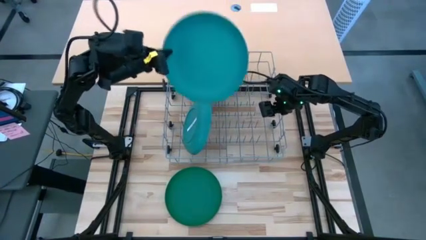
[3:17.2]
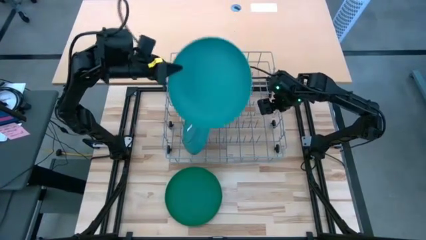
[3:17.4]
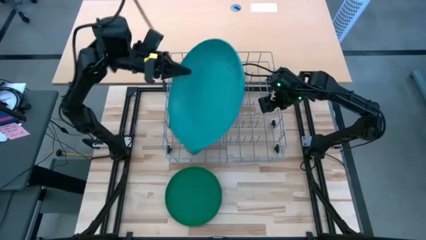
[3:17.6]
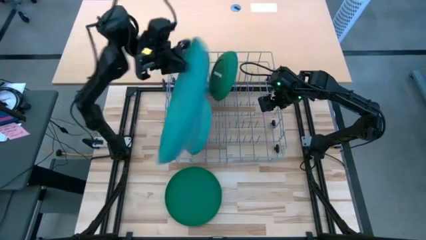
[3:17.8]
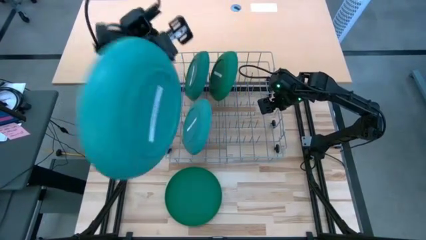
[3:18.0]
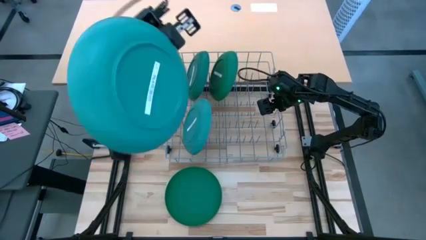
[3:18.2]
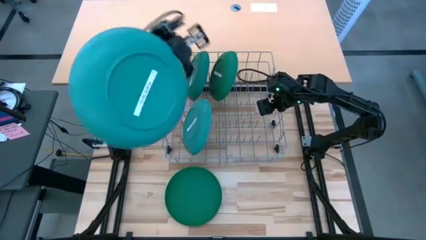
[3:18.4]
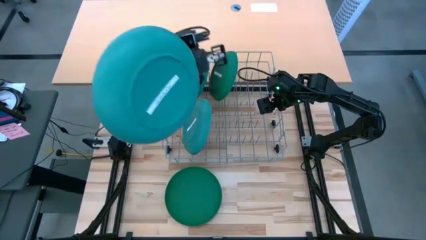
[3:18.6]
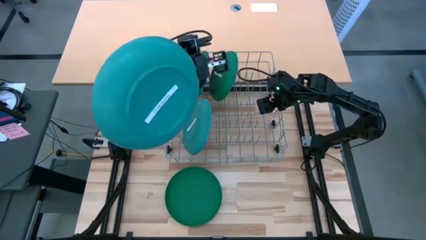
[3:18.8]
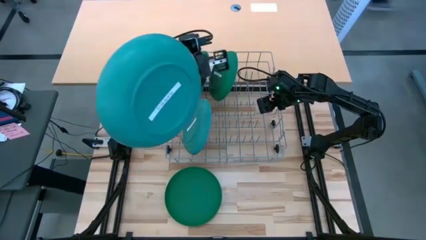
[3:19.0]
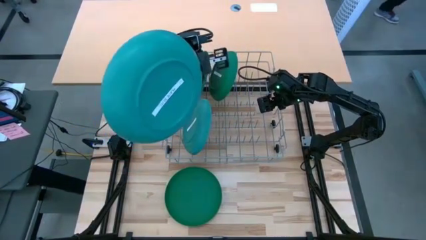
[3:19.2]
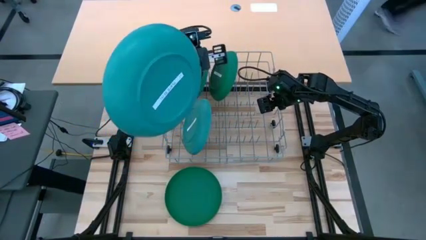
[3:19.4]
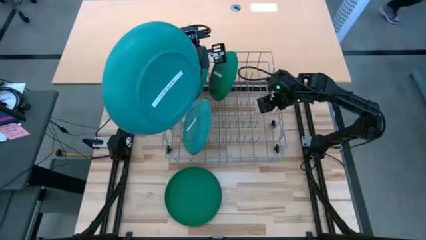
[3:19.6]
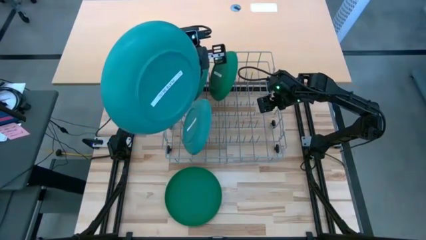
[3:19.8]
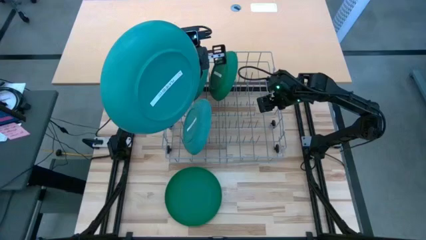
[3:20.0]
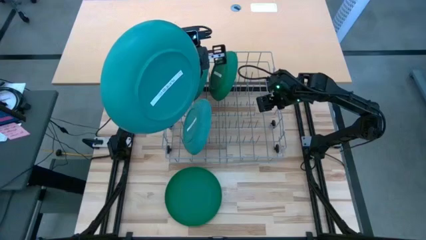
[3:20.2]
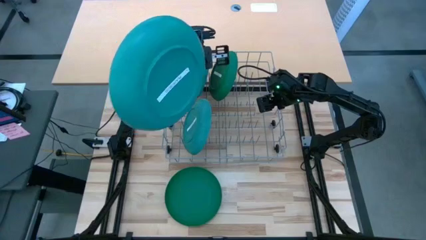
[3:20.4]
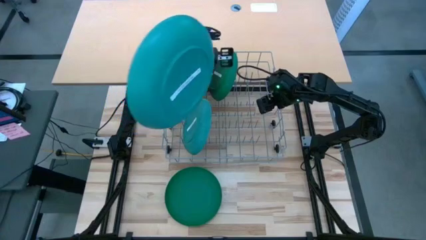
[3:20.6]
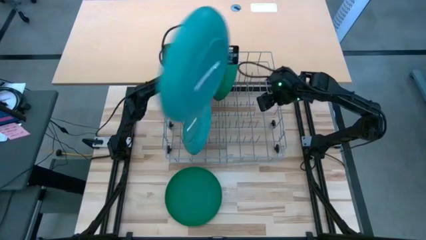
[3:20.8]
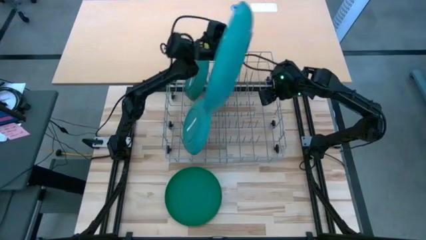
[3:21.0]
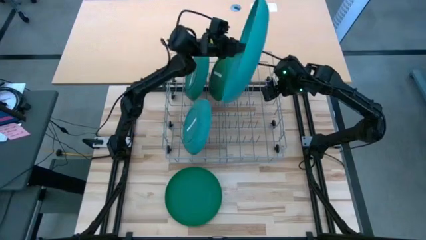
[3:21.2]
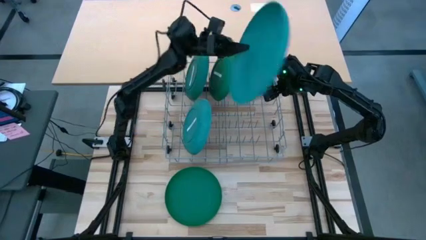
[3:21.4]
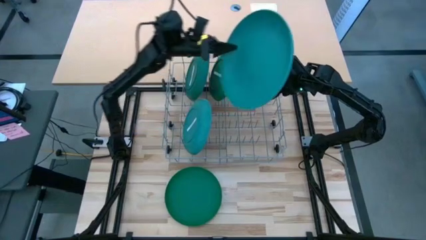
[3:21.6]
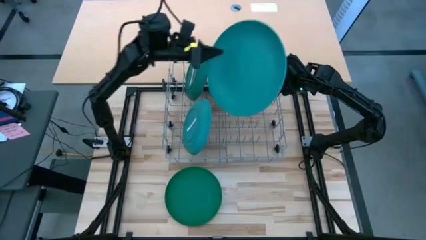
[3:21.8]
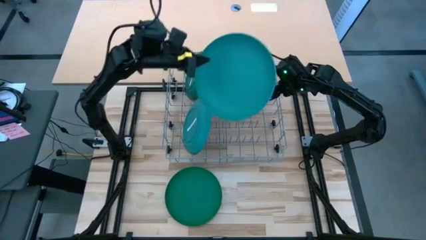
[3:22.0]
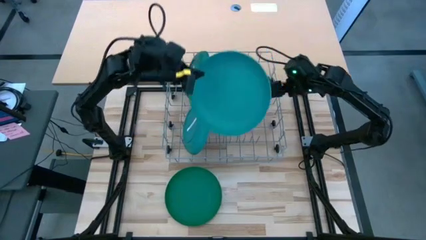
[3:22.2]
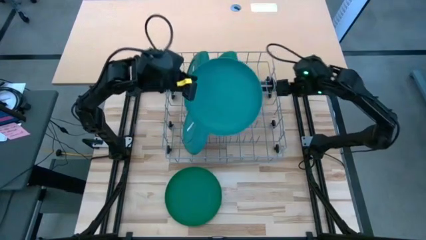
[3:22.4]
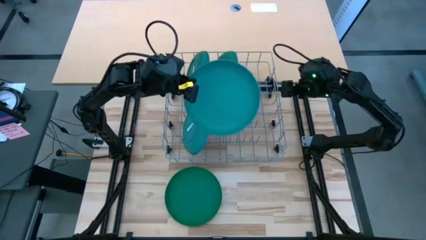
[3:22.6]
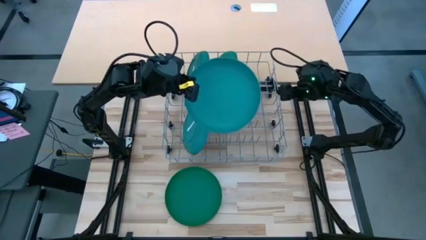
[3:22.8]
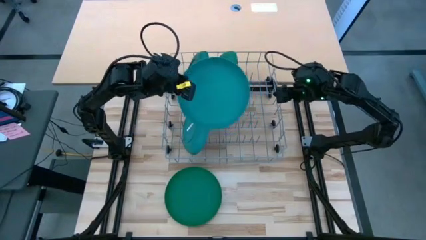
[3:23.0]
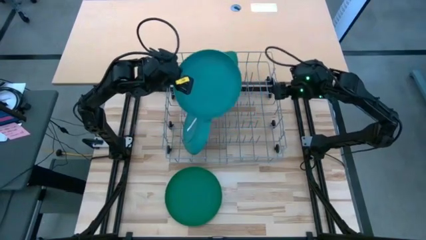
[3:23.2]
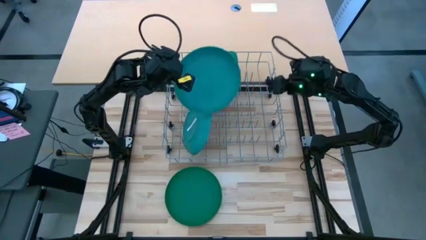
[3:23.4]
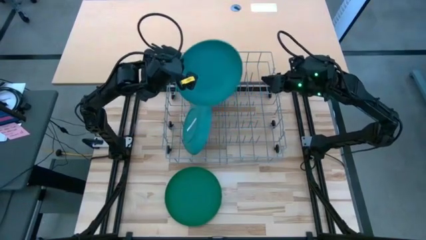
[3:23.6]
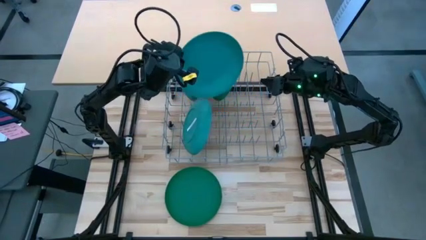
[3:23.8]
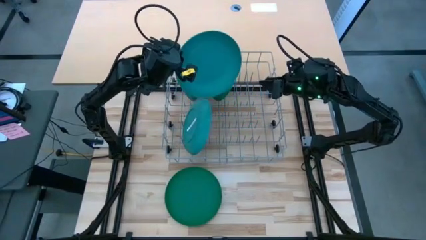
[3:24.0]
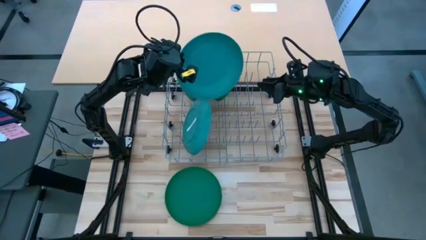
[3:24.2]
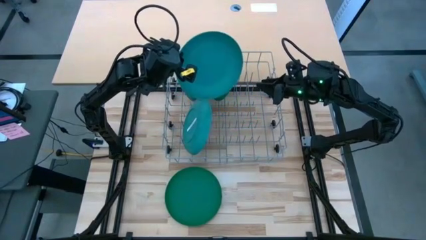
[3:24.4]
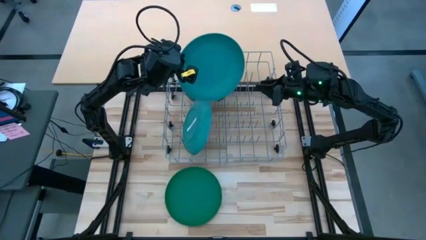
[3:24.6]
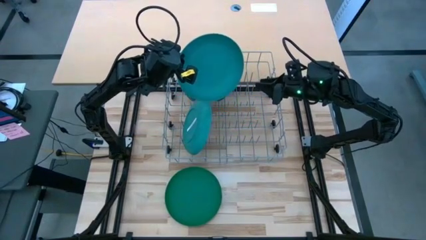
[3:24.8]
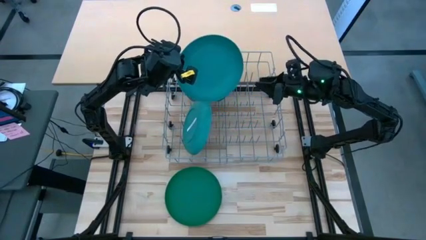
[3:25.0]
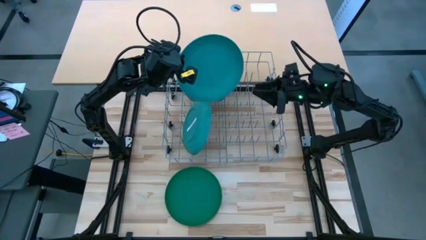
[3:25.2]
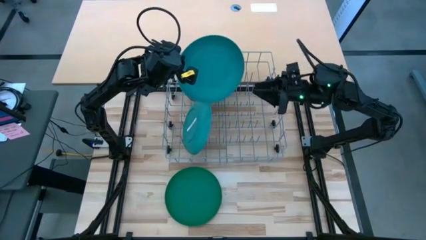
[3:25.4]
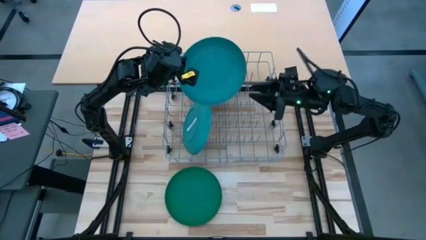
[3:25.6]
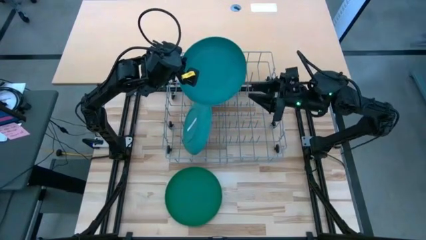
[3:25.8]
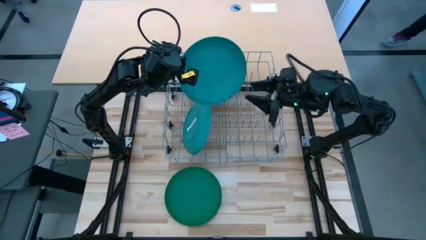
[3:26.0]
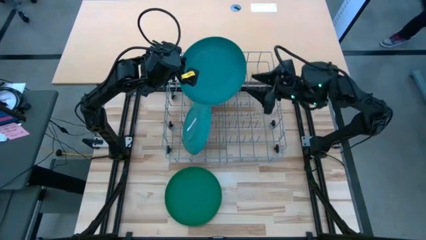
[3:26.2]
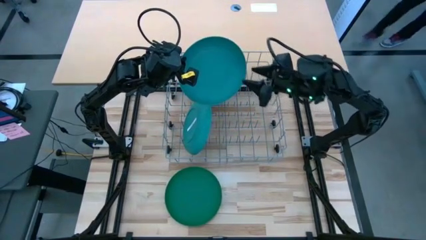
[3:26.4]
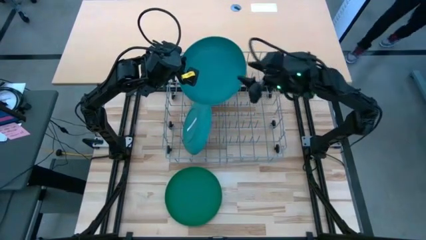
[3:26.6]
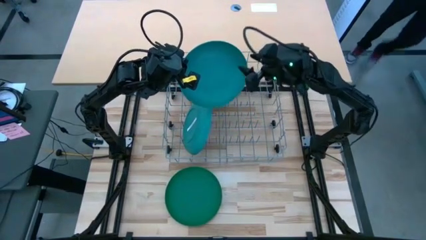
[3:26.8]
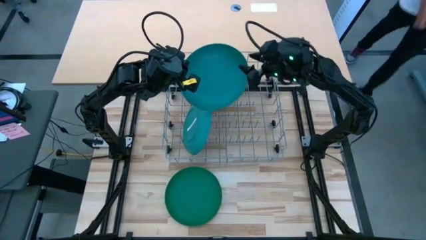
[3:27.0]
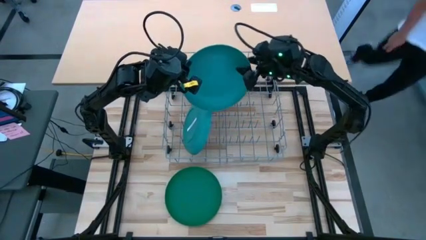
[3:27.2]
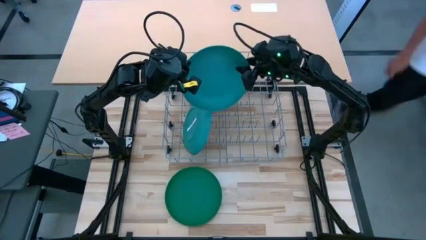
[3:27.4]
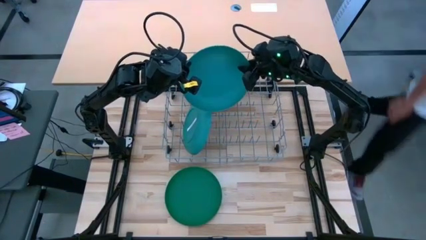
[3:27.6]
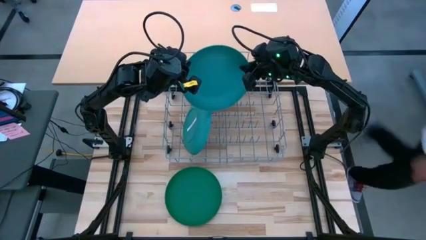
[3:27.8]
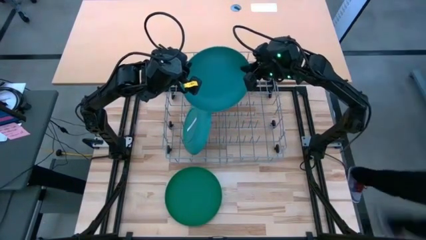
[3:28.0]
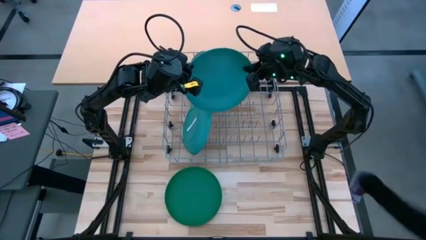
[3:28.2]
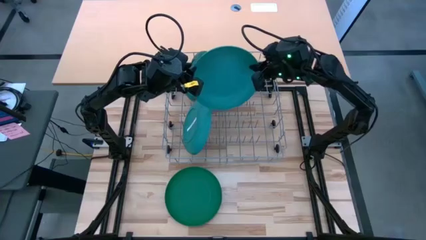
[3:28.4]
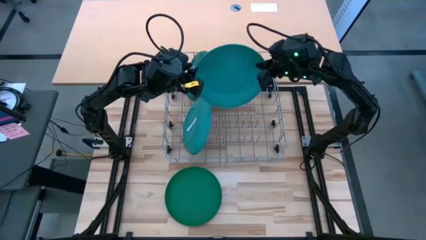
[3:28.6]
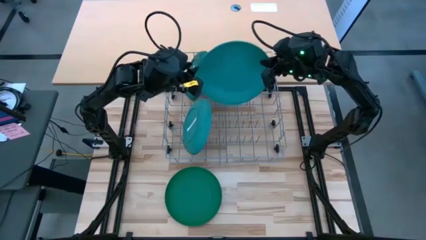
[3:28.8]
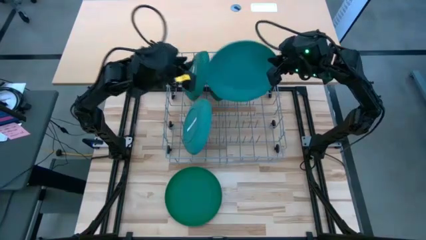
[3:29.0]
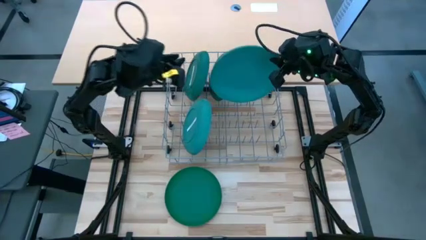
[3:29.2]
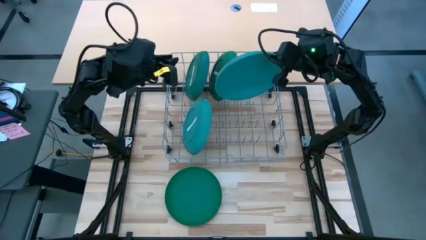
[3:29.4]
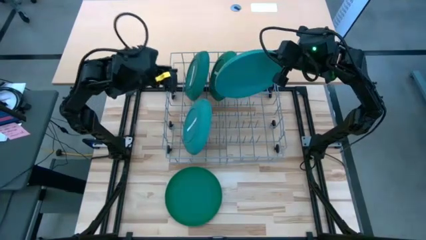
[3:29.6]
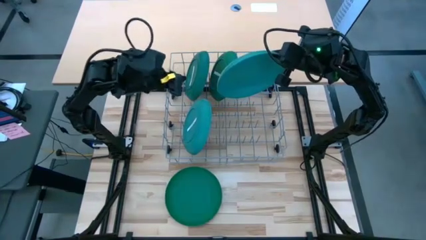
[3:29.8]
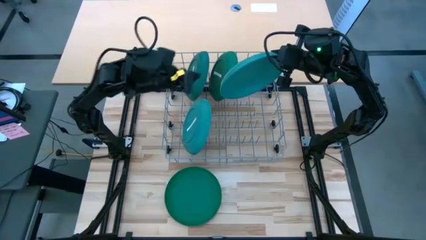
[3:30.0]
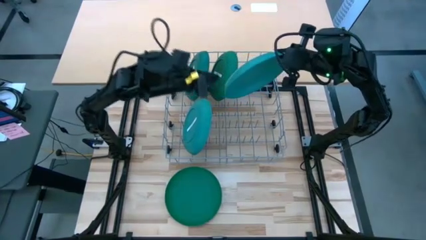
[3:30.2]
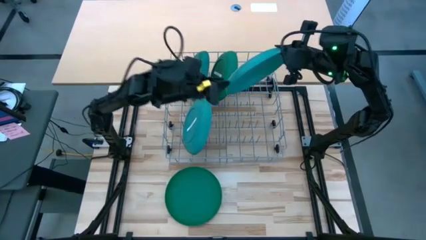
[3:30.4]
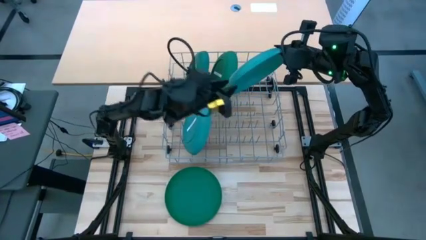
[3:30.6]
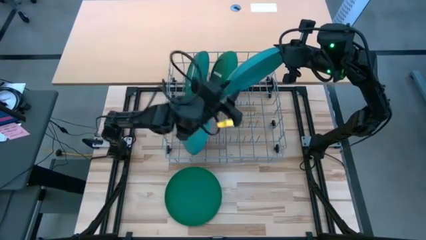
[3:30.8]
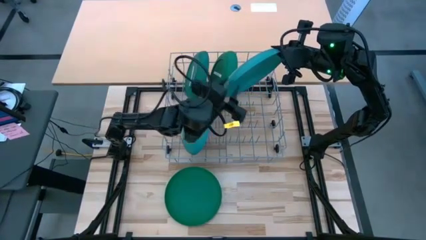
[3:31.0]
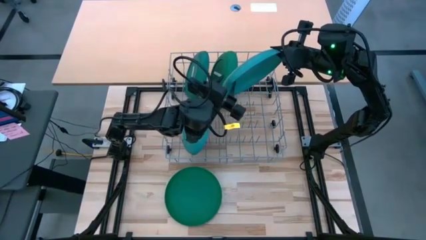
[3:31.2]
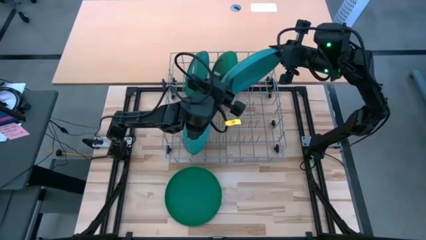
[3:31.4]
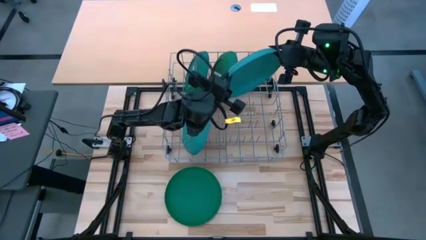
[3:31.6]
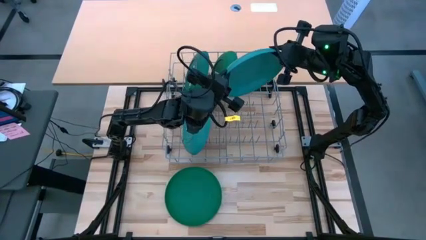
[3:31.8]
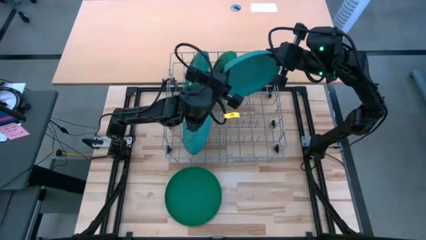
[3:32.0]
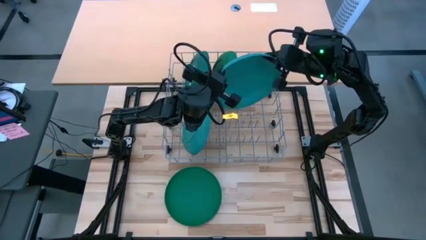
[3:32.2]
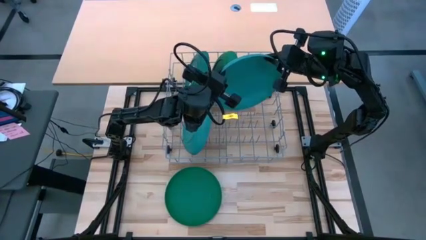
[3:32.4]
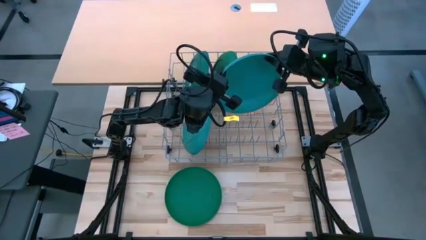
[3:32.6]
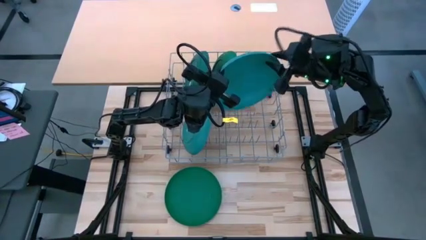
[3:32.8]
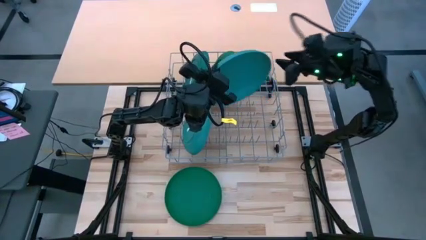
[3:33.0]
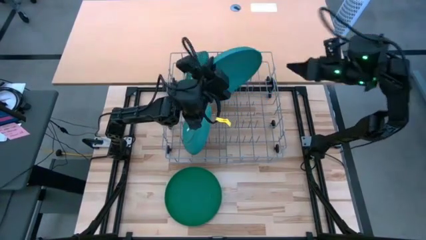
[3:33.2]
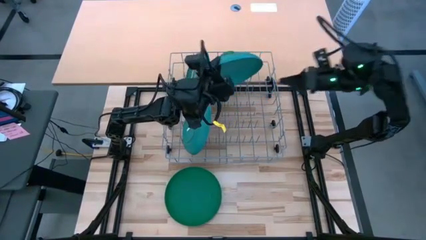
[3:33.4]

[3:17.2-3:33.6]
Task: Sort dishes
Put the blue plate into the dish rack

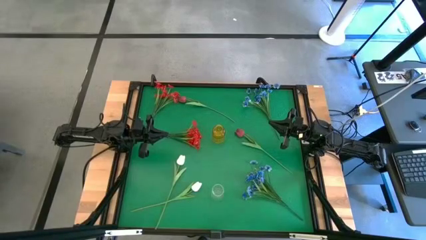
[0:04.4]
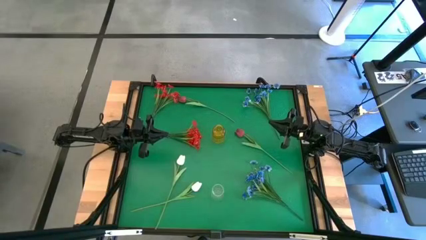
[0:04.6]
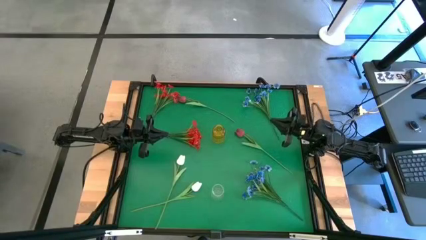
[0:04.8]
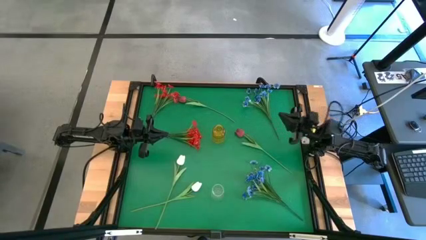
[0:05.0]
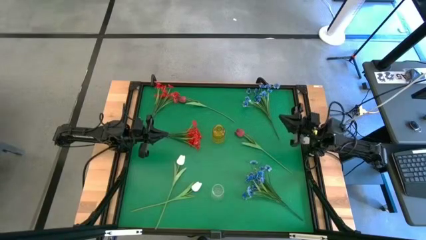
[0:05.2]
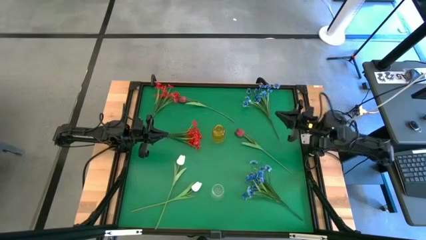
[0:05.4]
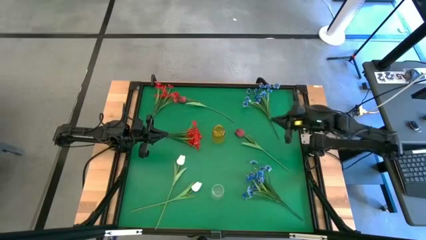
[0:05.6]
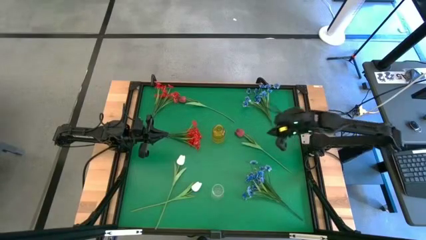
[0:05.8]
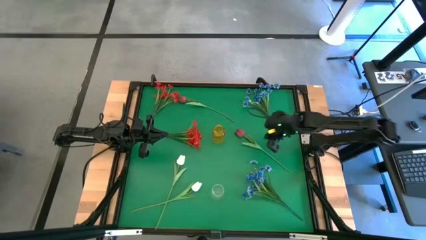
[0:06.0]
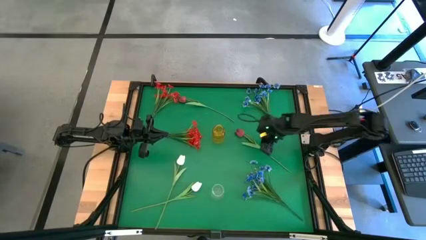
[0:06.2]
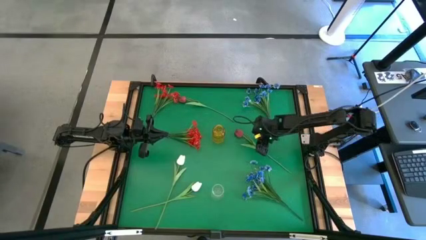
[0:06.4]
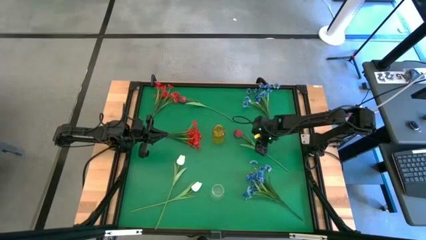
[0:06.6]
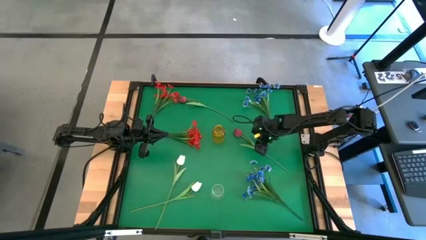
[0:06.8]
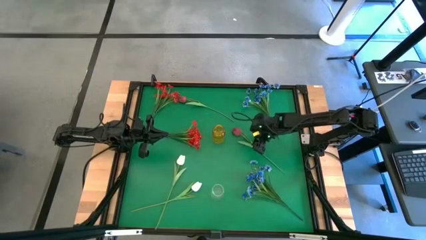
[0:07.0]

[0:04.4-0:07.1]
Task: Sort flowers into vase by color
Put the bottom dark red flower into the yellow vase
